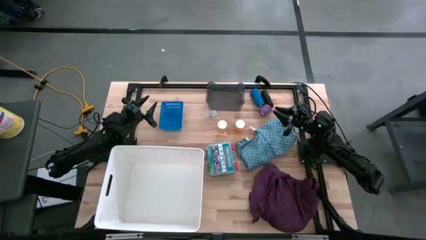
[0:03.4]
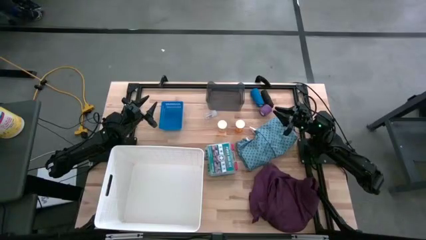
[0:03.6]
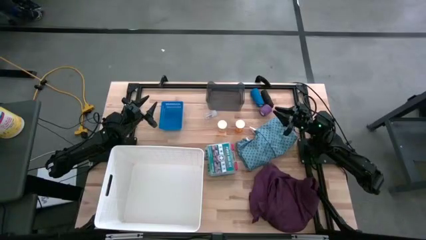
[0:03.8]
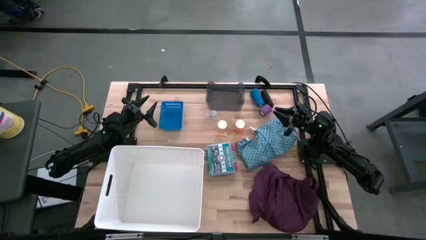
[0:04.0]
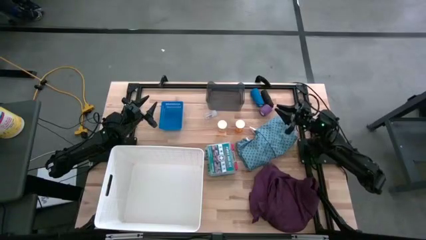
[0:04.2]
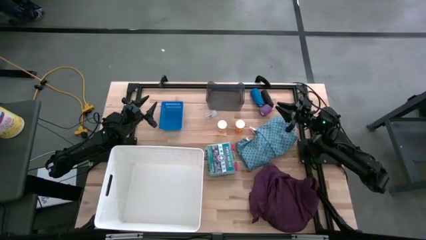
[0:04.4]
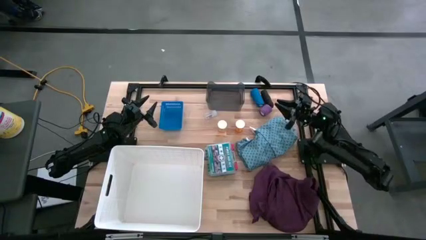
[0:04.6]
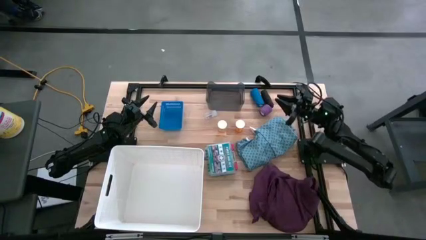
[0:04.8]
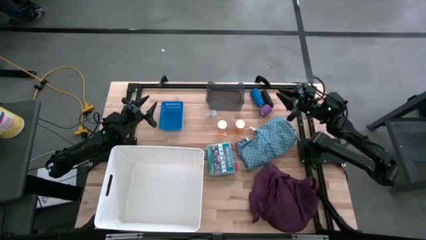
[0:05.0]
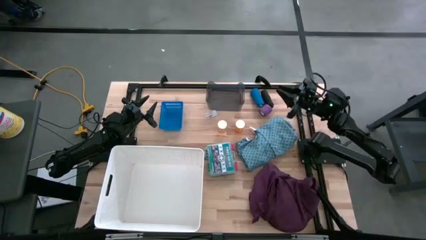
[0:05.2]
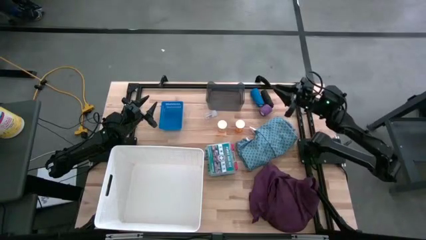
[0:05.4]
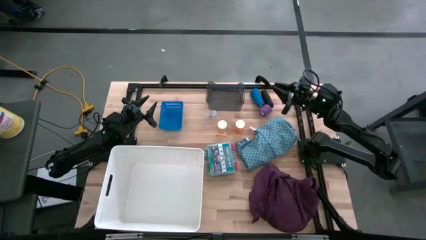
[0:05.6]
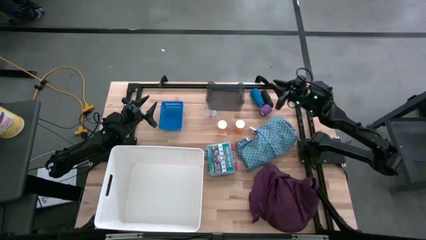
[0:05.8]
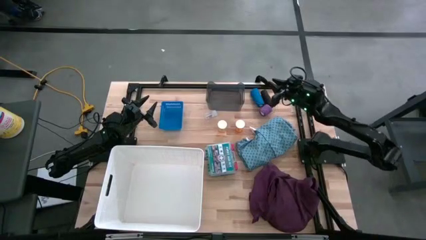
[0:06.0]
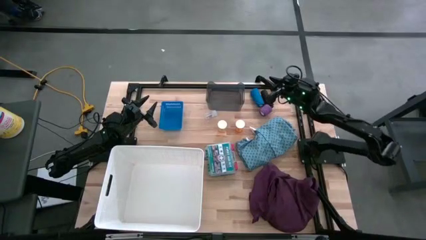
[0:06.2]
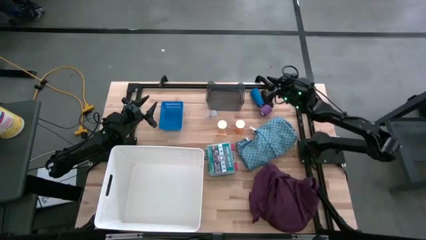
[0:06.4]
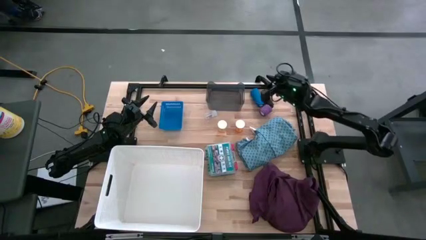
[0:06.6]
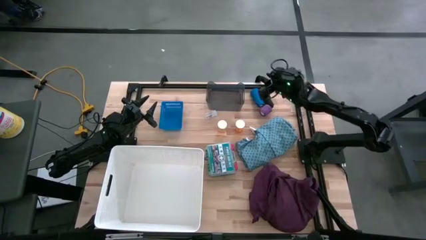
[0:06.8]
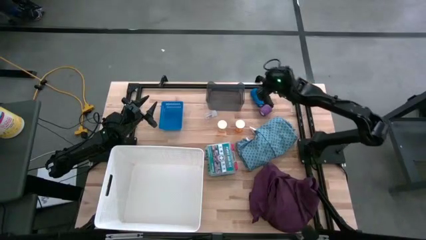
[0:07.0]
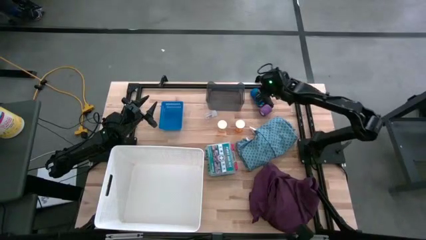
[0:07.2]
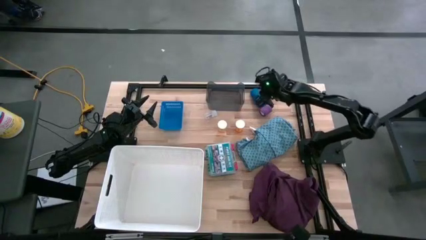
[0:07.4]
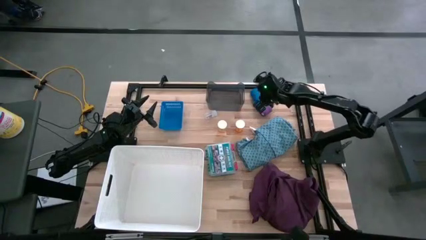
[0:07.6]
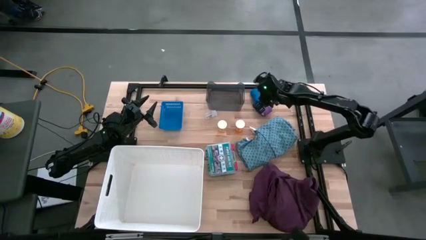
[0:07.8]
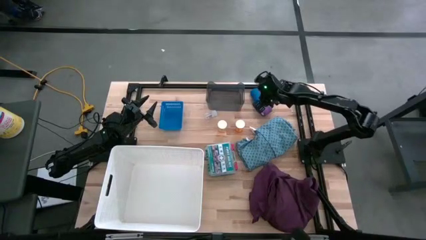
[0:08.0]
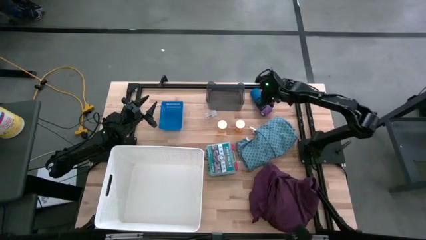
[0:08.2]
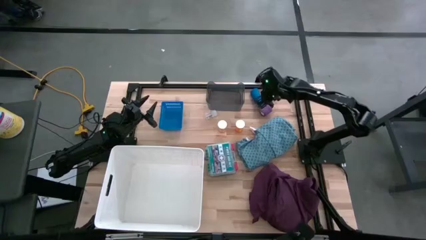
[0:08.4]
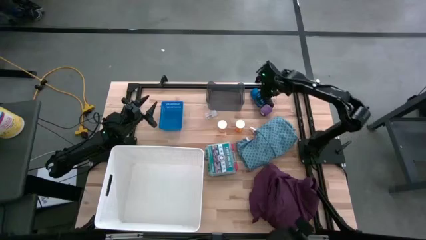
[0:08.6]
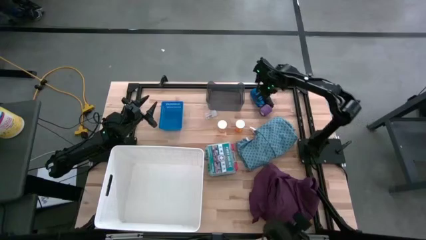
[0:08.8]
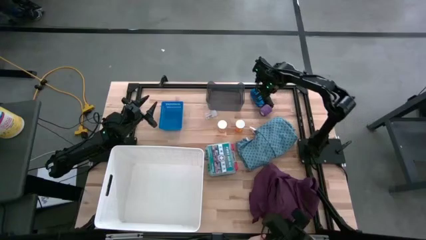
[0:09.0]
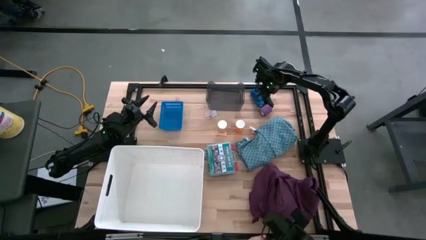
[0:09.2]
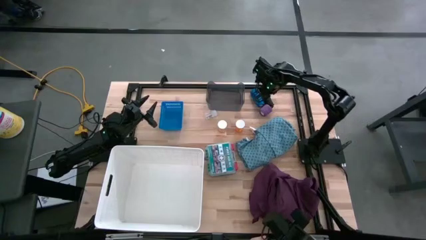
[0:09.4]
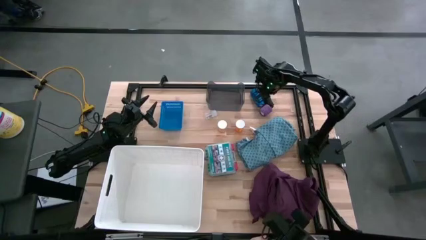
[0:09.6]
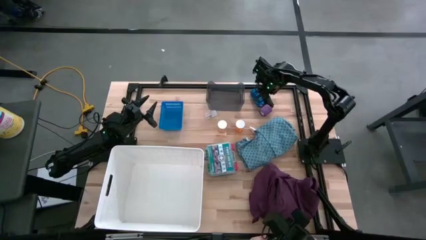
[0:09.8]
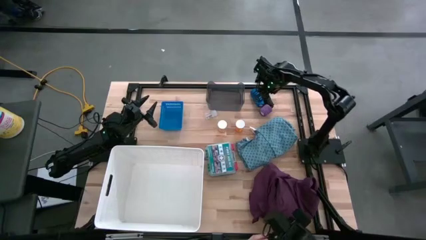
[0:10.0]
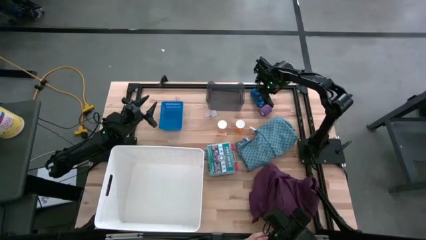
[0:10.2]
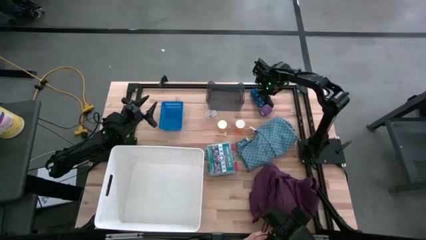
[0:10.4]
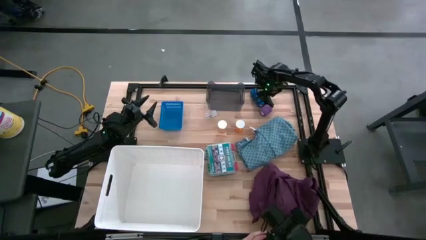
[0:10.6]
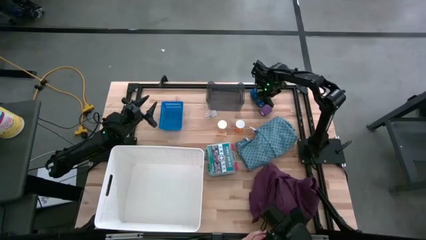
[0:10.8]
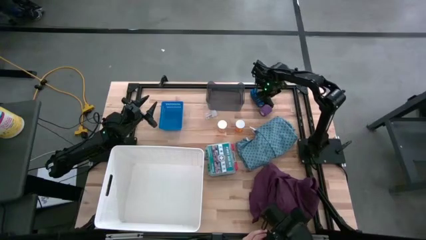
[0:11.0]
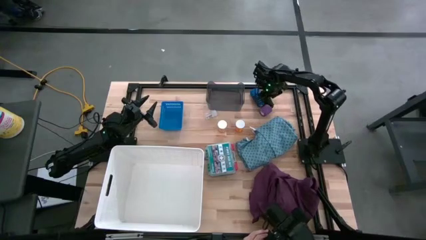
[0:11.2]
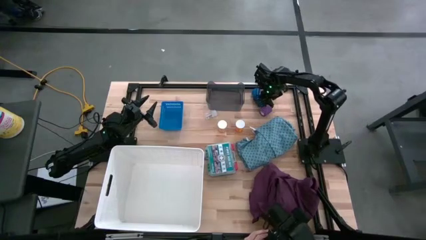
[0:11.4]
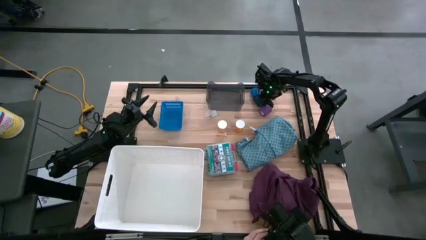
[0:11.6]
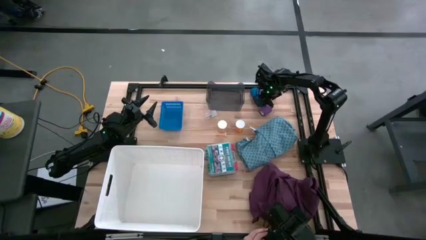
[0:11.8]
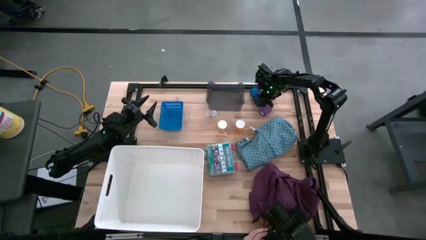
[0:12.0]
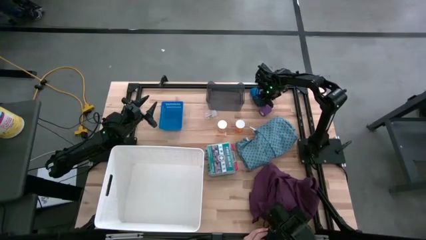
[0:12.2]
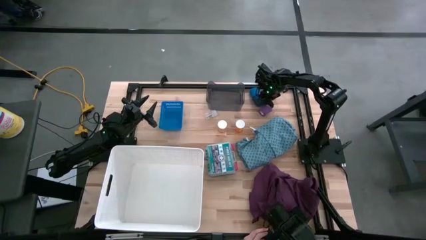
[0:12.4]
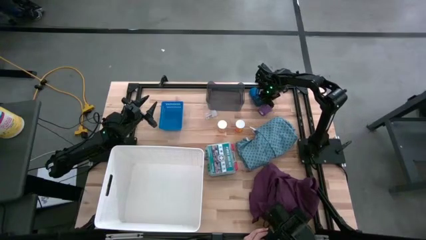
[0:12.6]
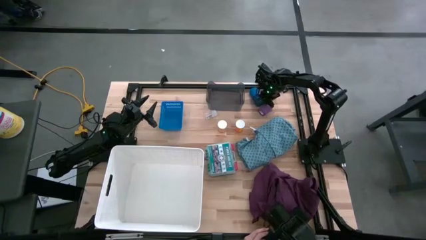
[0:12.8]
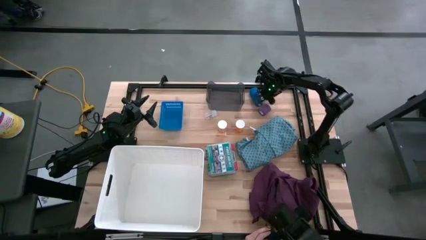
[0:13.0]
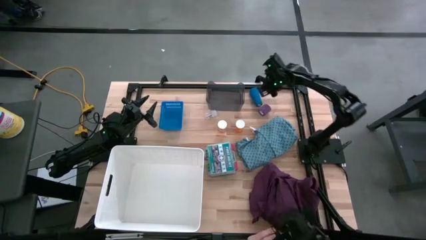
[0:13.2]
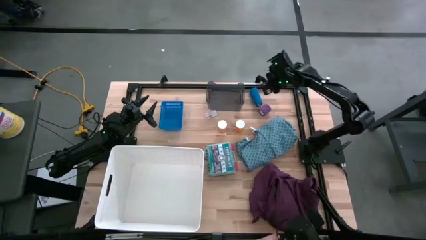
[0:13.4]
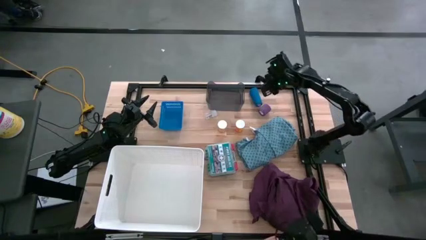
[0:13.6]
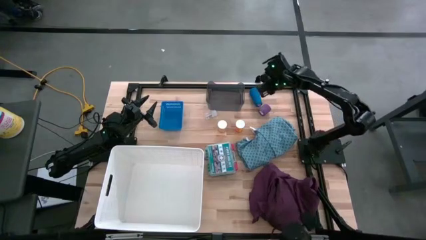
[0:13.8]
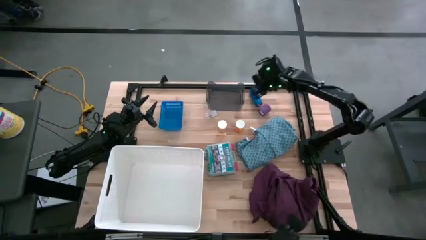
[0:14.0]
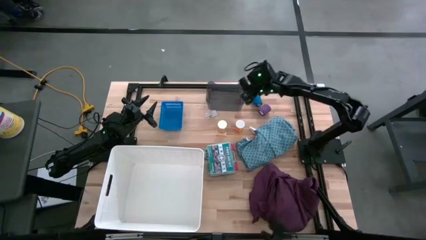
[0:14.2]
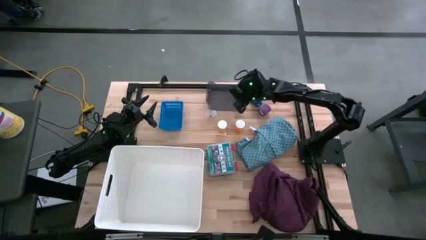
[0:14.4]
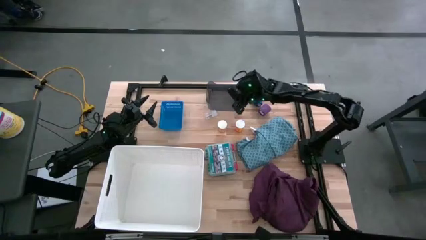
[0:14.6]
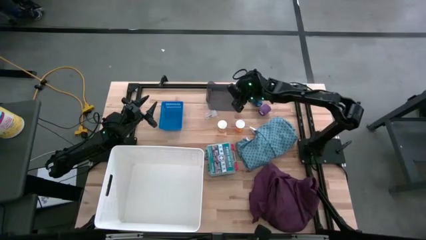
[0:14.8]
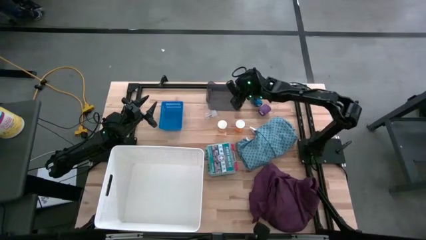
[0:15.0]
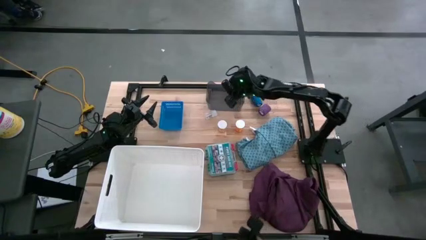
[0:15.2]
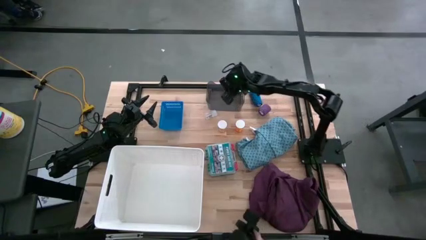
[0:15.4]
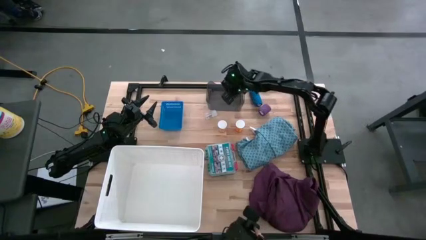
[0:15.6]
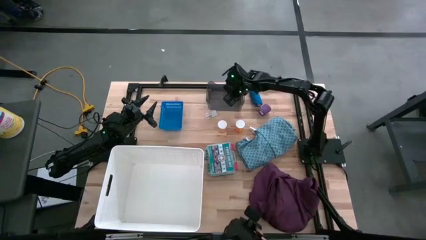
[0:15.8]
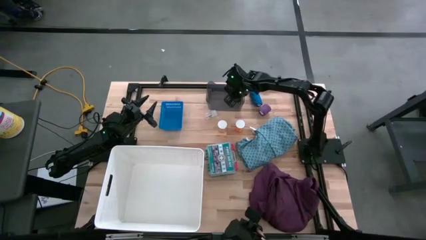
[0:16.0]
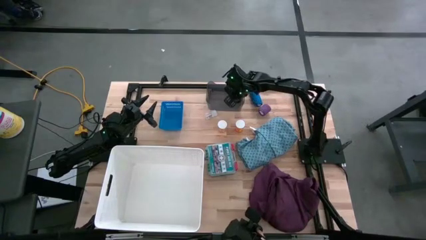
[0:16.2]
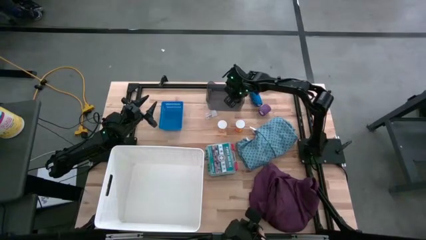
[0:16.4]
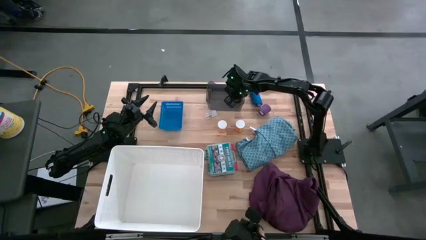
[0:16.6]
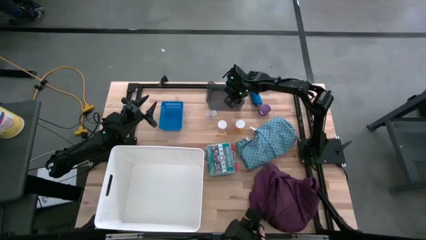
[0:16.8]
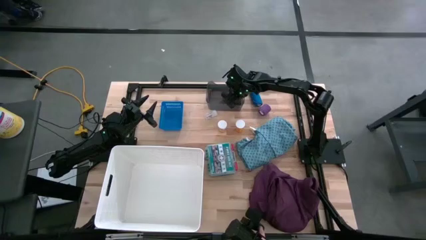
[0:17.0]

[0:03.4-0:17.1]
Task: Pick & place medical supplies in basket/bin
Put the black bandage into the black bin

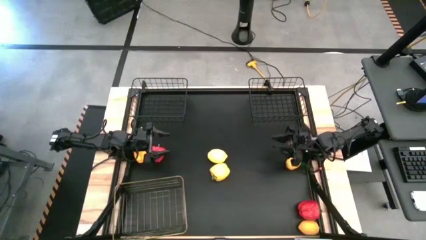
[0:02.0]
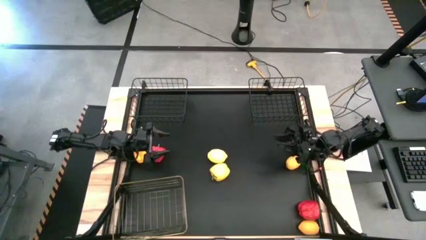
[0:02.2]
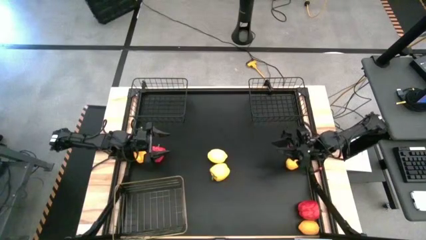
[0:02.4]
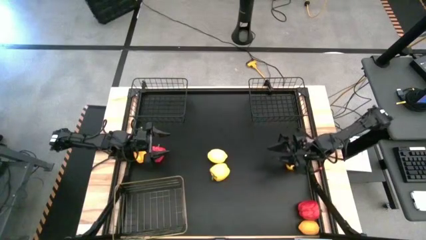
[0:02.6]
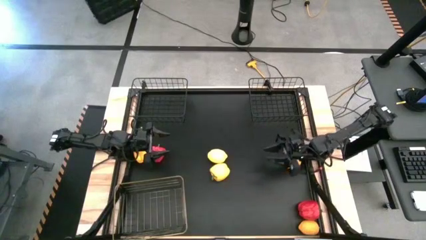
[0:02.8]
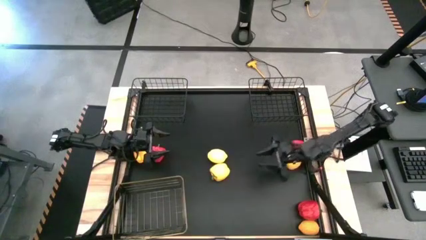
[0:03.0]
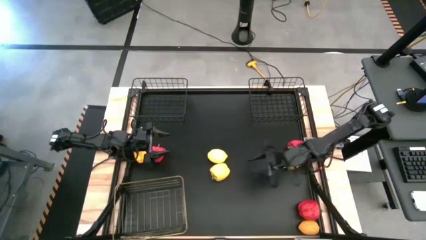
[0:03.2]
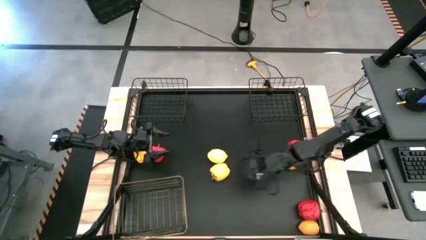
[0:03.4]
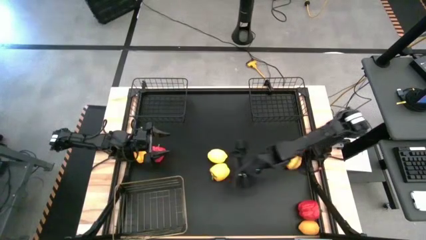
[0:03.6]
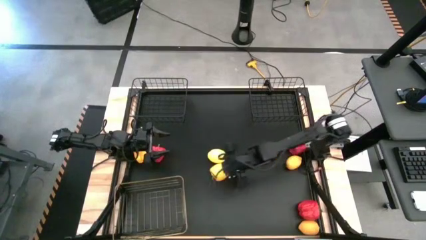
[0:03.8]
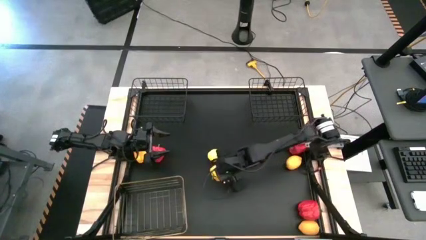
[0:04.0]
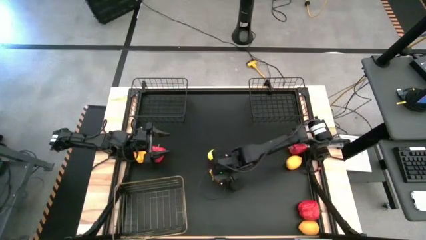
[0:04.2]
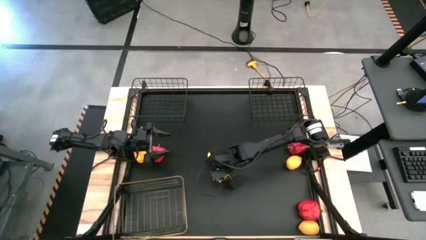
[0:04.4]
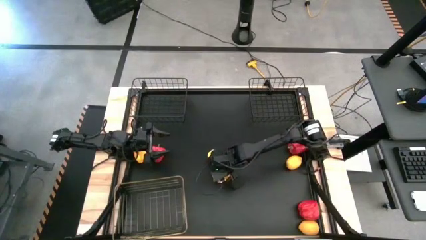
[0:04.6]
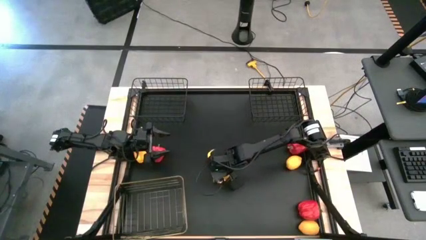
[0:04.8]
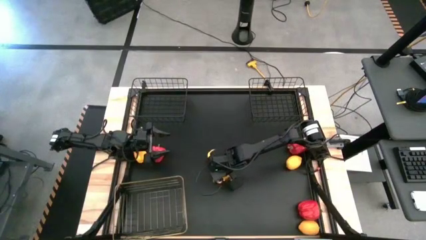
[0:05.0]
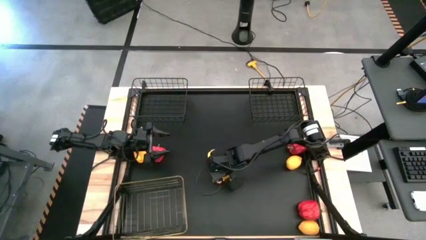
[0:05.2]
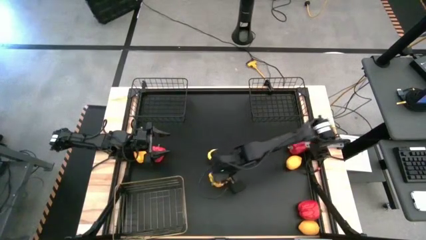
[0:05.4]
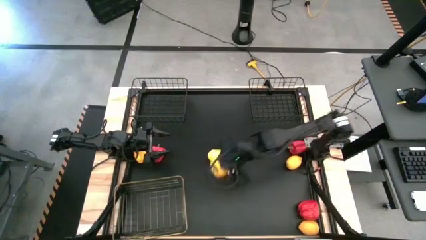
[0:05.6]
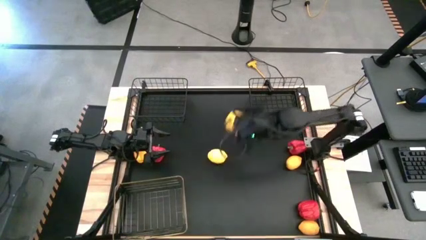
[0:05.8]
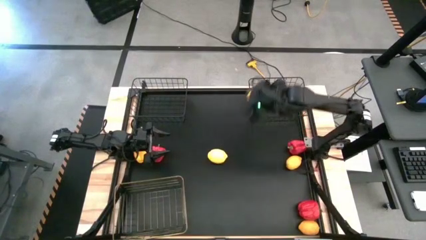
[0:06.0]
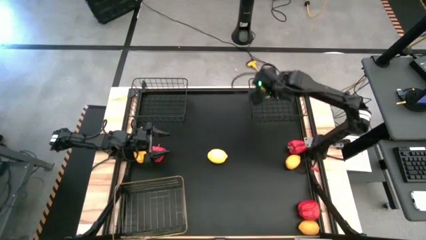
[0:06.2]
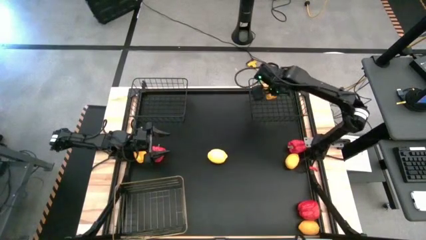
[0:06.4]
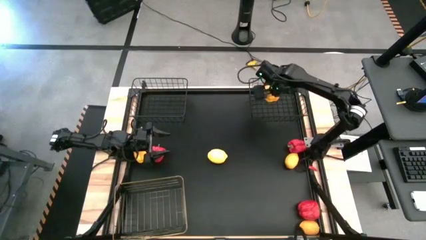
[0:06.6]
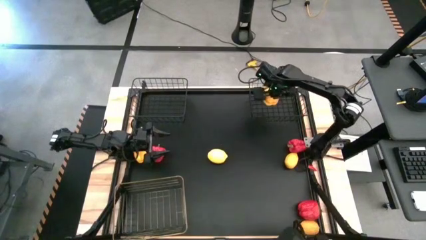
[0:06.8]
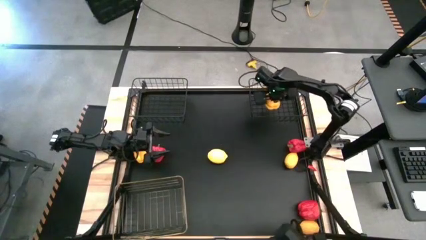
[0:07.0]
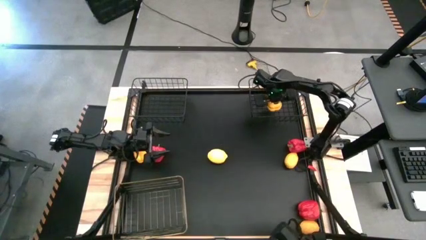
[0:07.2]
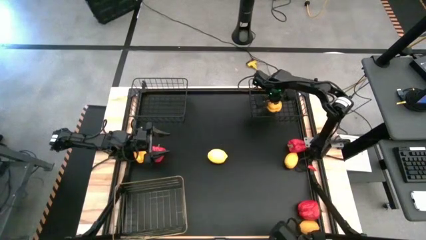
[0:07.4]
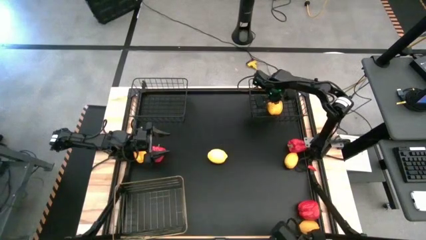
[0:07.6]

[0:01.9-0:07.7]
Task: Sort produce into baskets
Put the right yellow bell pepper into the right black wire basket
